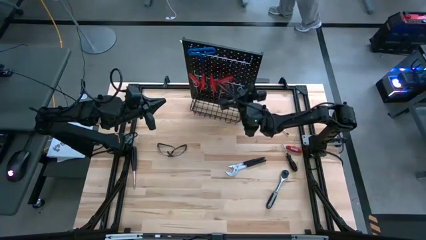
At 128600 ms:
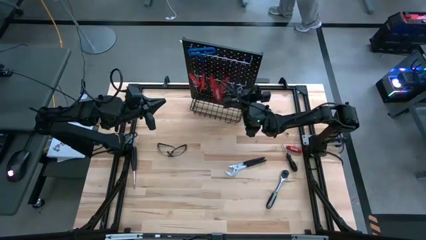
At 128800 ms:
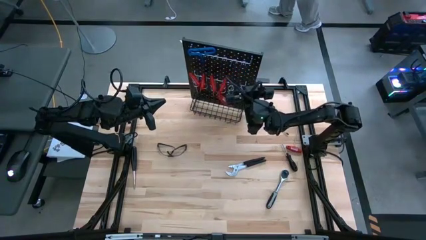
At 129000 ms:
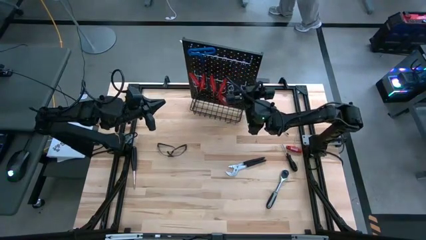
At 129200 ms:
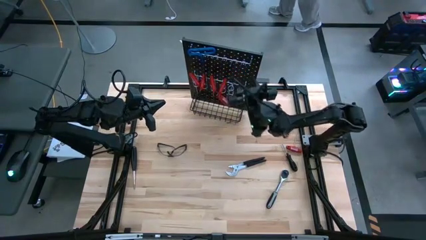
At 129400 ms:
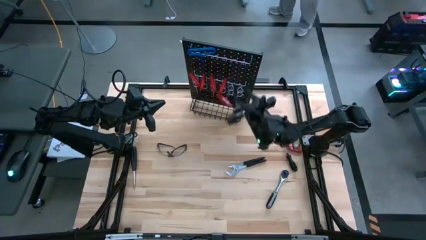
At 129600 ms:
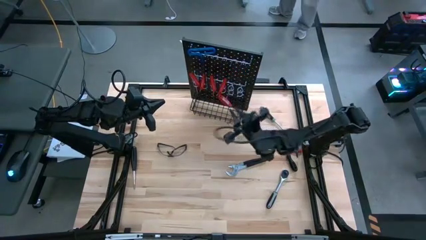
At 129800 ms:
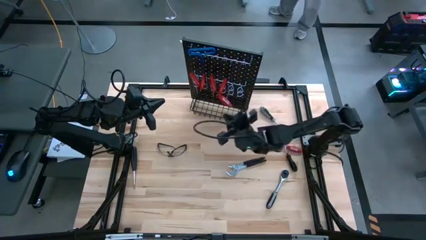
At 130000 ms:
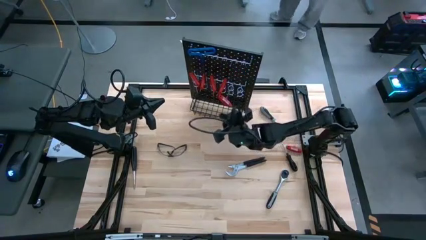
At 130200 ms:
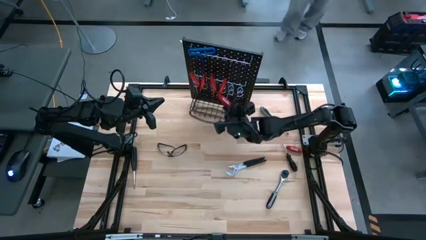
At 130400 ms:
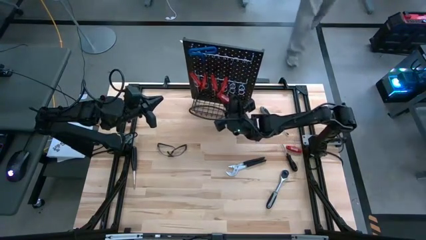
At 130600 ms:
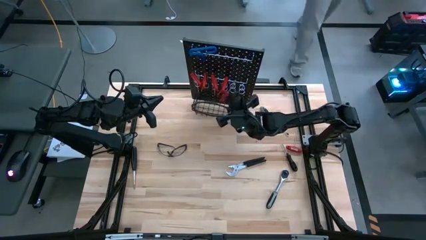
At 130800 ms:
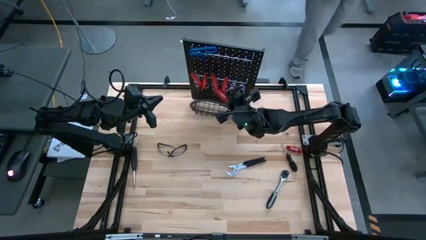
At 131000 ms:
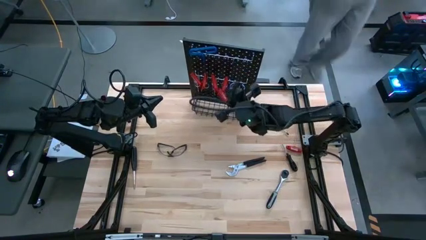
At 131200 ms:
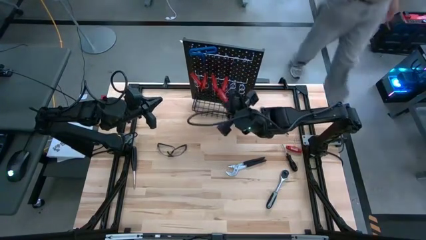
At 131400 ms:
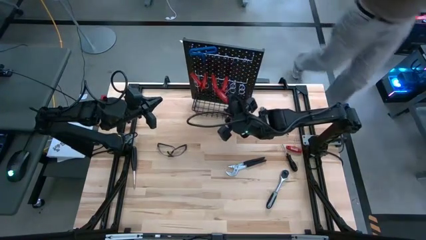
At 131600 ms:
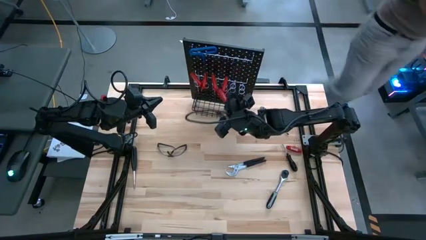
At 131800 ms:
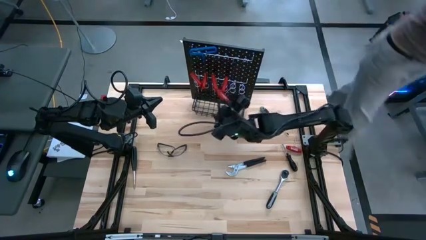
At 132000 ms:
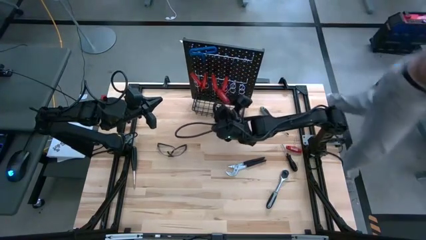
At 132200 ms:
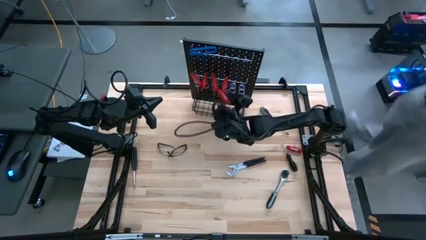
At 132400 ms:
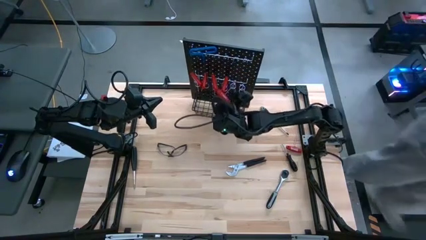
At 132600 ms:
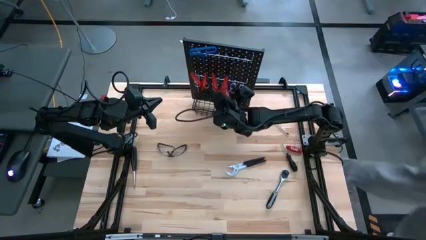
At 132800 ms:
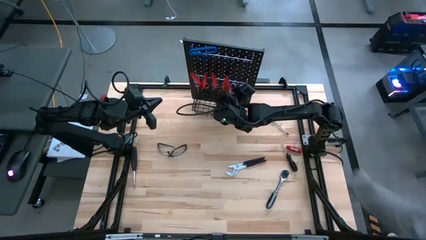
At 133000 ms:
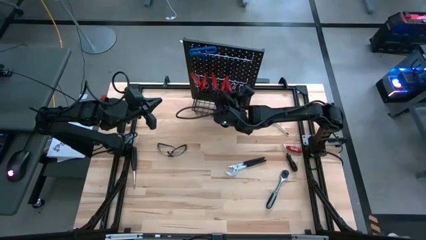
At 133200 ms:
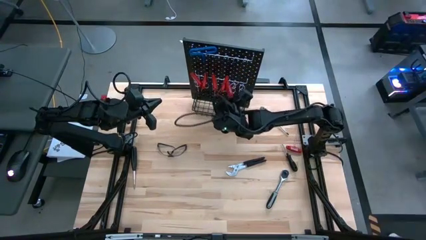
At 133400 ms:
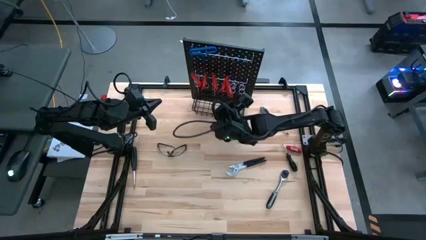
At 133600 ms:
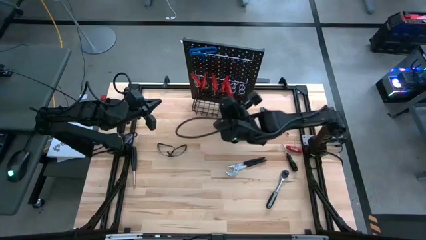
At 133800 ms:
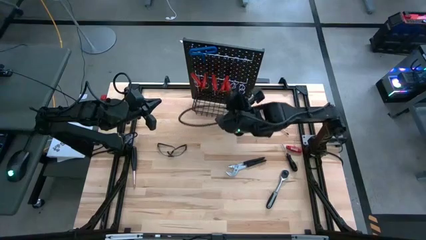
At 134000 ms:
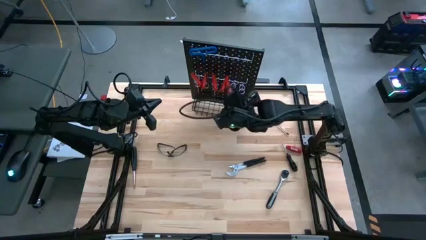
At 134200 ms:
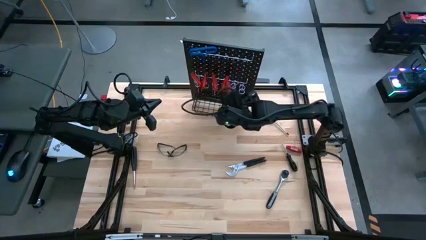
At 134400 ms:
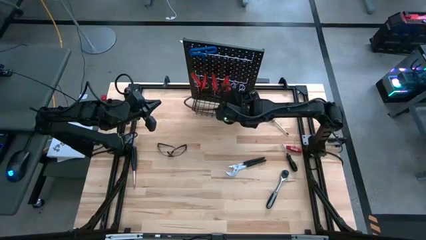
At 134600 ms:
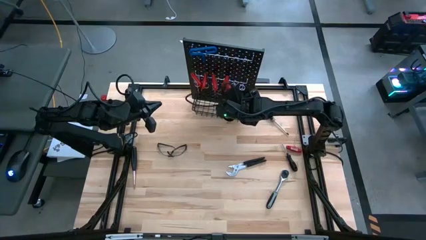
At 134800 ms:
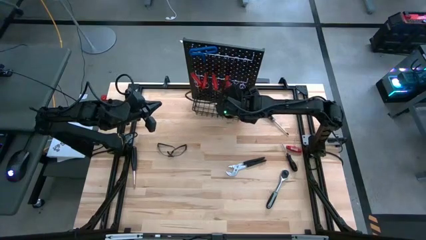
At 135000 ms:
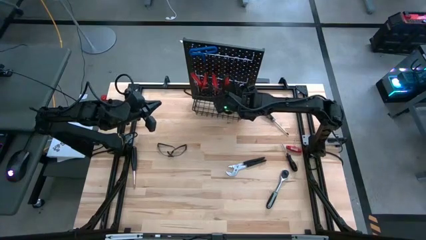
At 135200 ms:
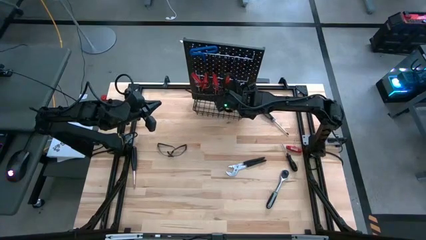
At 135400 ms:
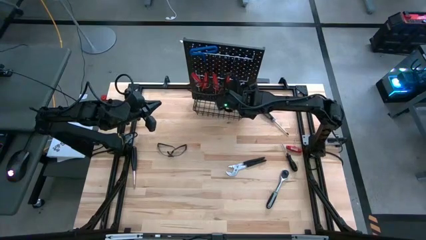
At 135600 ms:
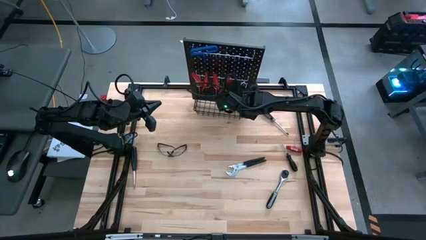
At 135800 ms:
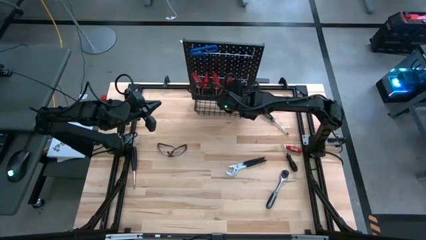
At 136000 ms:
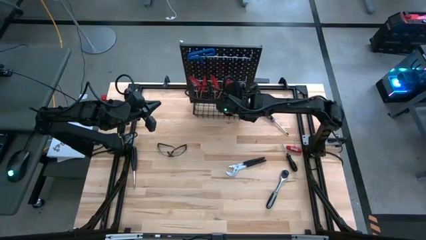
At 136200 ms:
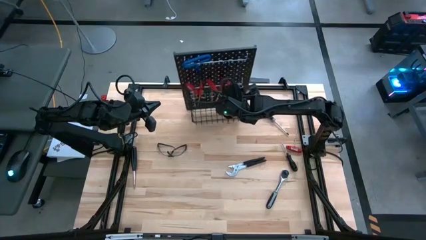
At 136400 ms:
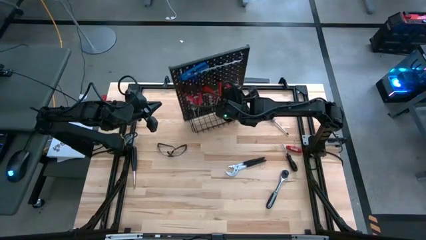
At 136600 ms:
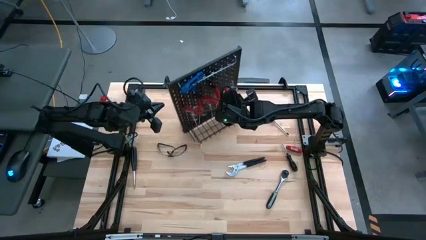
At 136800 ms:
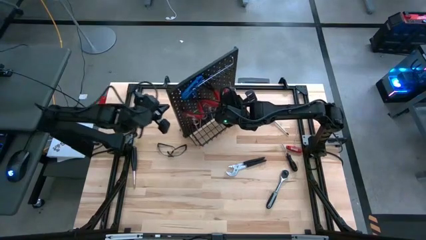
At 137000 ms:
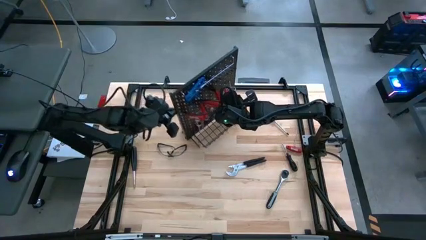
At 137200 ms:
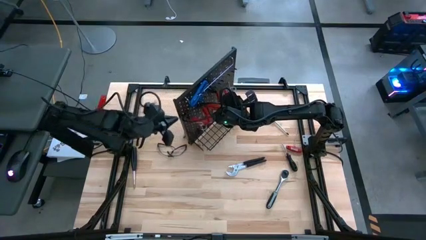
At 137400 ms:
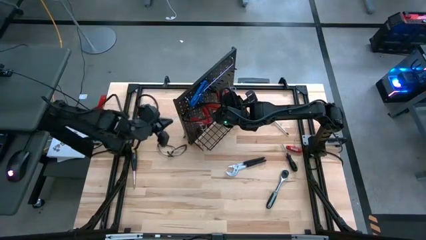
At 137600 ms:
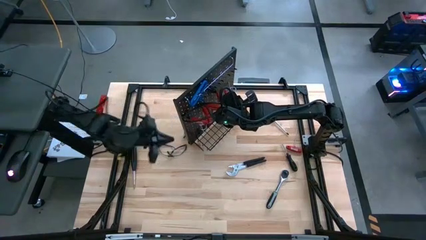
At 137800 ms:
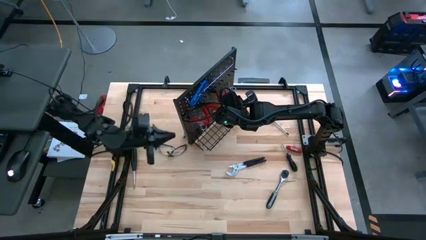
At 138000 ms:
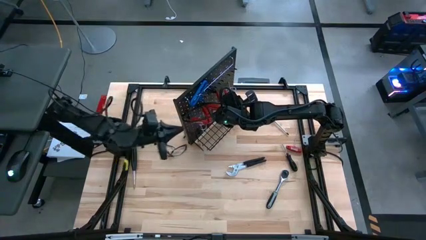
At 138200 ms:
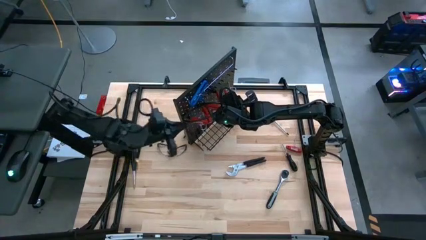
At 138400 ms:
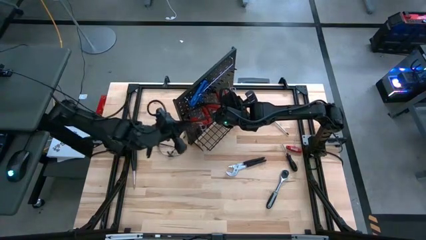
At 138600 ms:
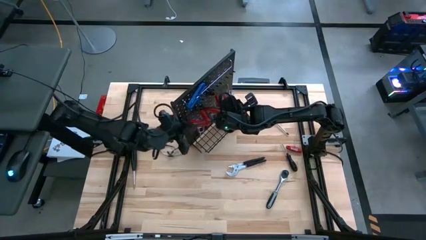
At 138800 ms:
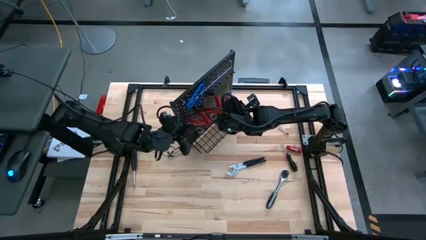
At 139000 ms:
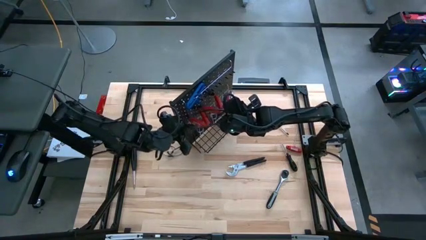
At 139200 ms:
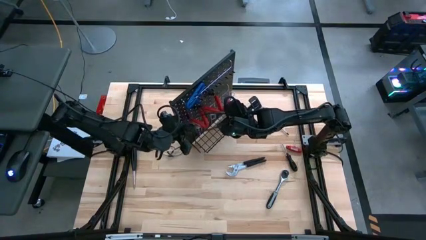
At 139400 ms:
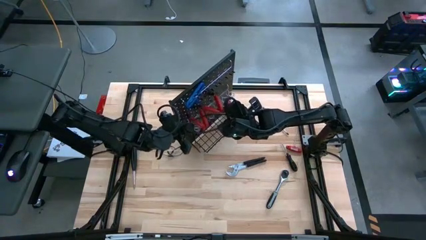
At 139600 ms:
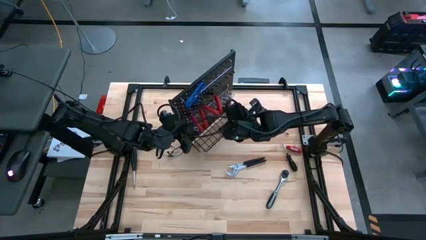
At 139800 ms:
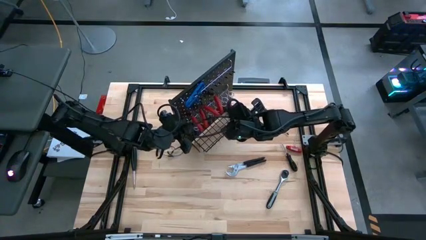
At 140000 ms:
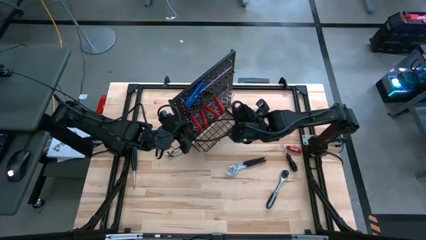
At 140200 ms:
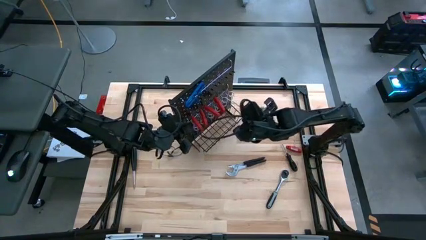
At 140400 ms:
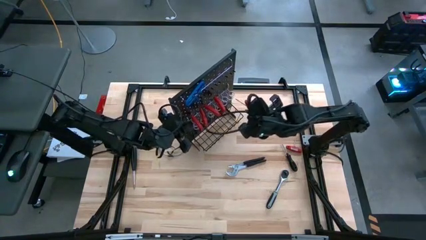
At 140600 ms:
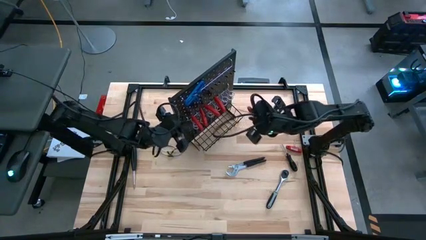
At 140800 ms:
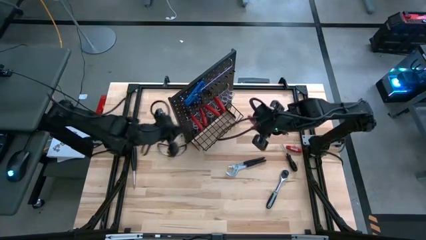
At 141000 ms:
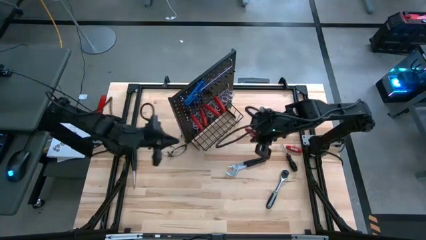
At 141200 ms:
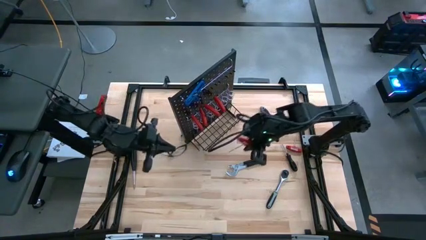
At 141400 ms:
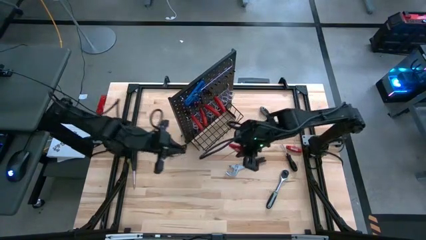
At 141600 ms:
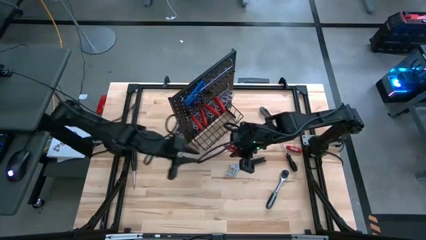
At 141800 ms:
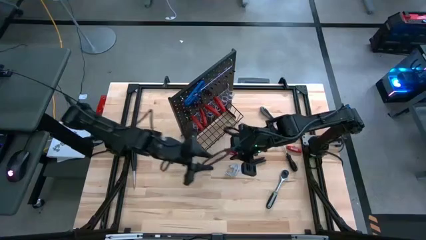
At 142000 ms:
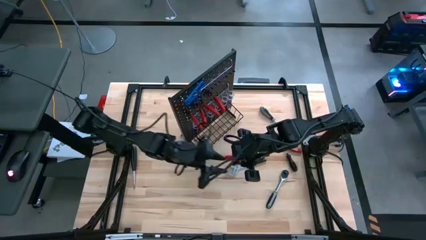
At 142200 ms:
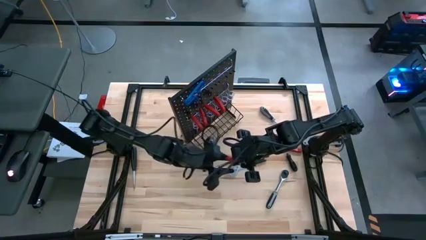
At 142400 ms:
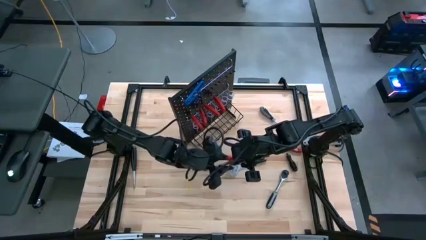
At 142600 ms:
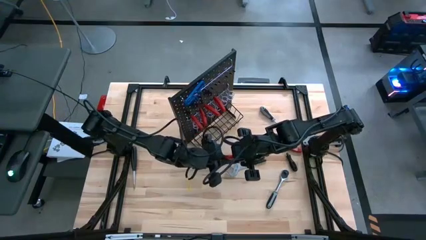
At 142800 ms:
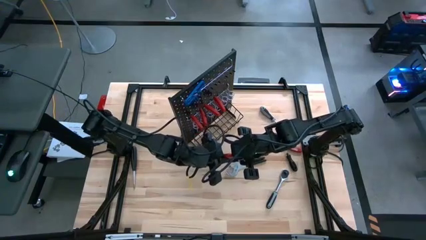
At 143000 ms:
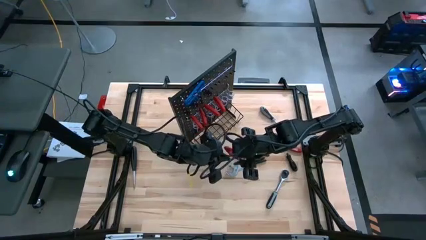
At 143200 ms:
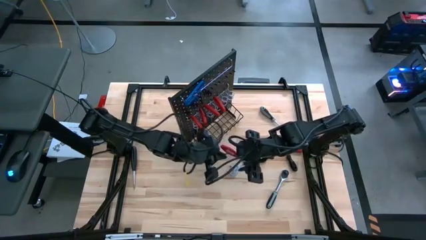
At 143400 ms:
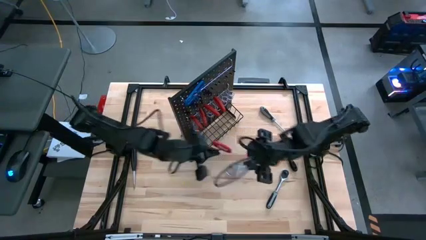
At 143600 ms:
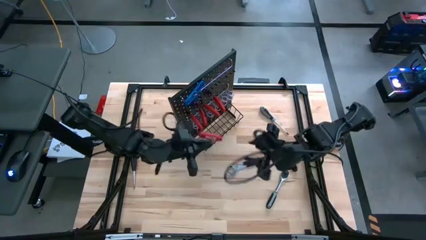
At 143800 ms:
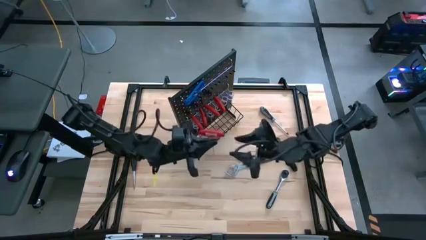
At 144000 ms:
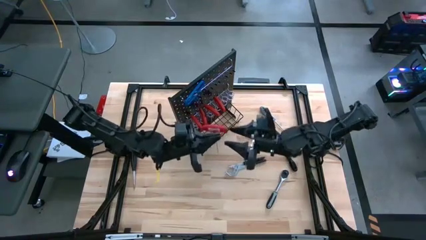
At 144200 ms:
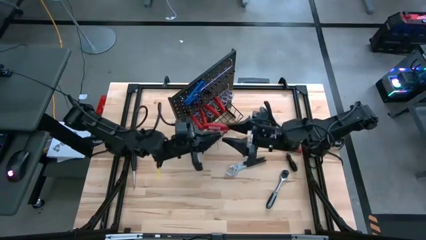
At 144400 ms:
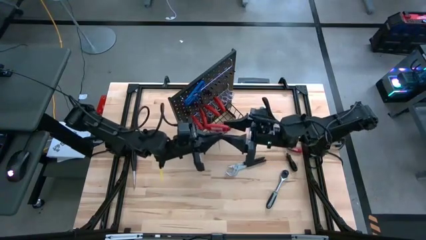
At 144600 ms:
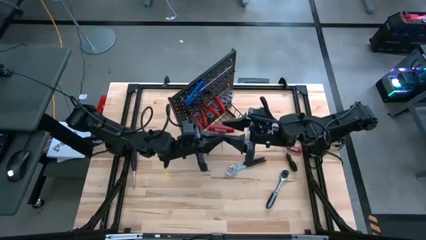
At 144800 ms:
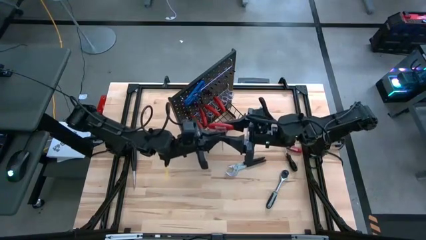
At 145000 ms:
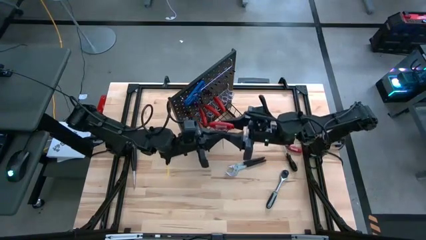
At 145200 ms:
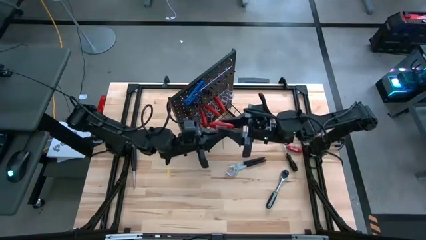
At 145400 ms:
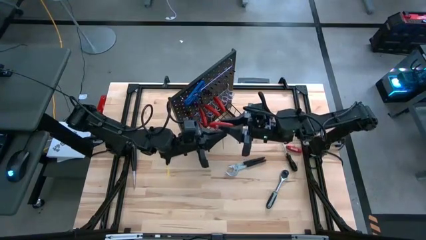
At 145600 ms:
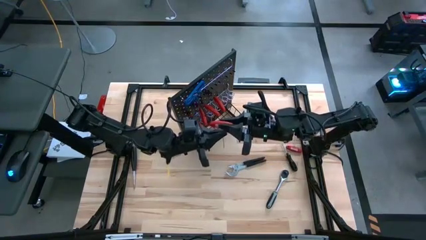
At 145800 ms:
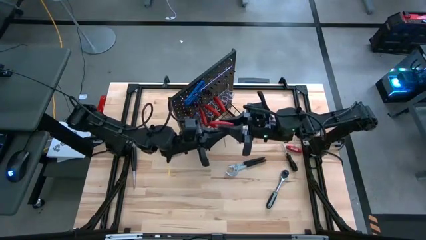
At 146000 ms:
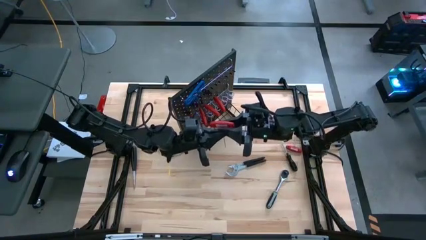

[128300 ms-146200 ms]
Task: Hang tools onto peg board
Hang the left red allen wrench on the pegboard
